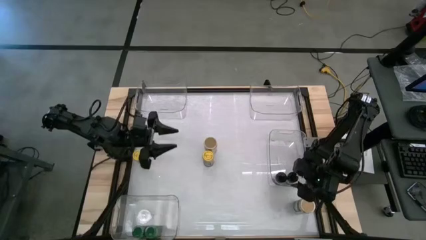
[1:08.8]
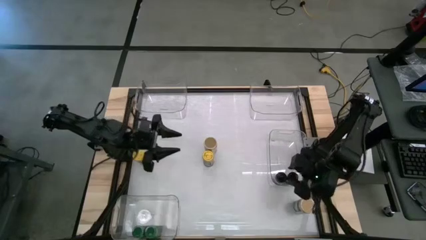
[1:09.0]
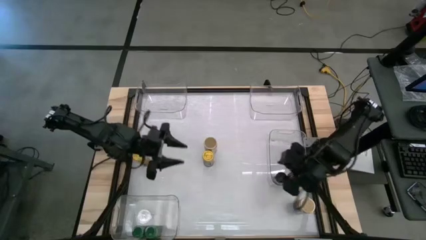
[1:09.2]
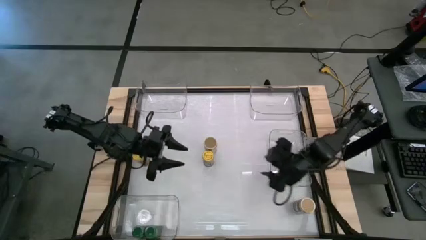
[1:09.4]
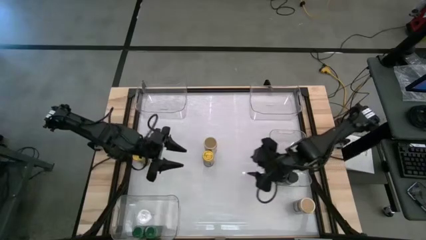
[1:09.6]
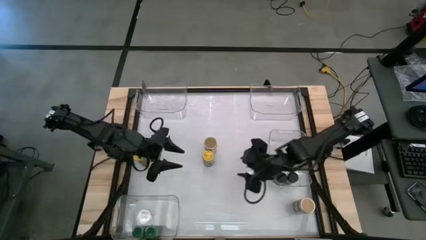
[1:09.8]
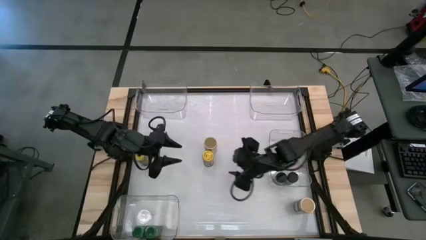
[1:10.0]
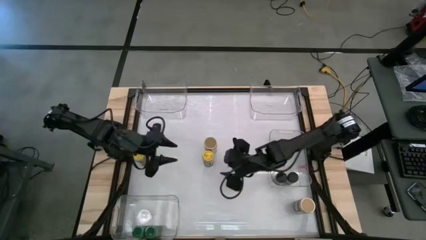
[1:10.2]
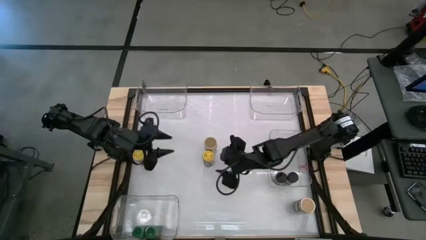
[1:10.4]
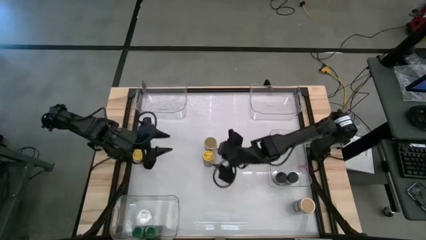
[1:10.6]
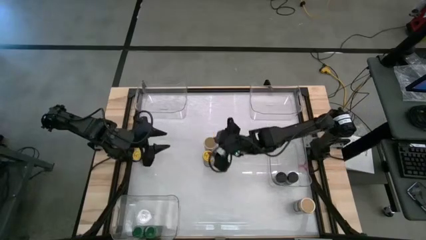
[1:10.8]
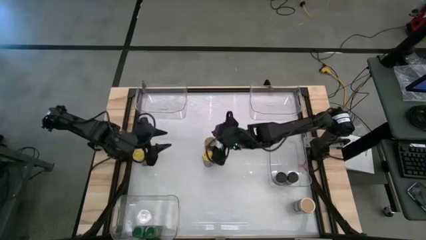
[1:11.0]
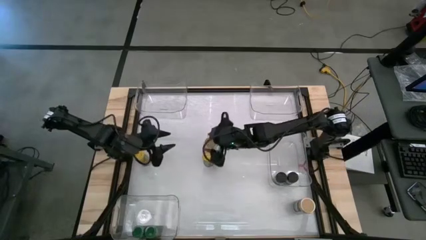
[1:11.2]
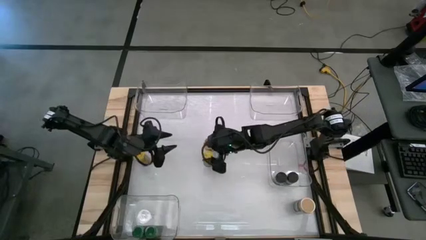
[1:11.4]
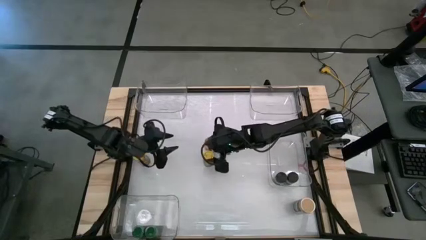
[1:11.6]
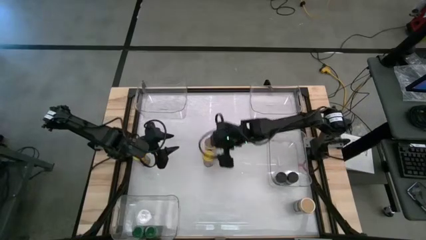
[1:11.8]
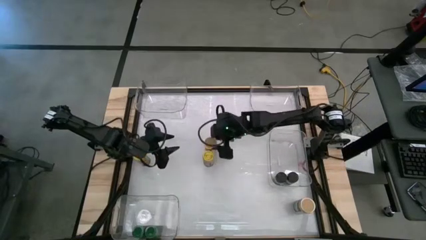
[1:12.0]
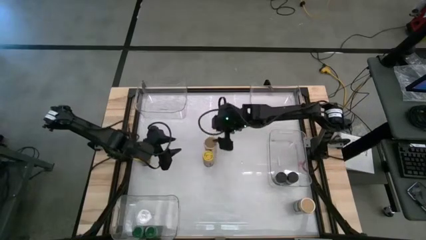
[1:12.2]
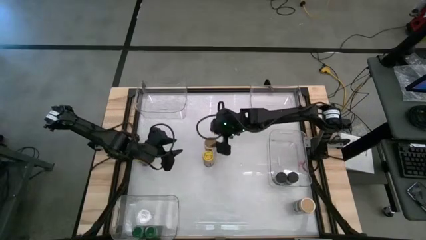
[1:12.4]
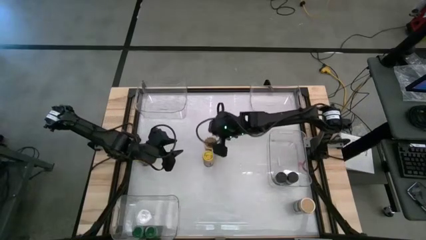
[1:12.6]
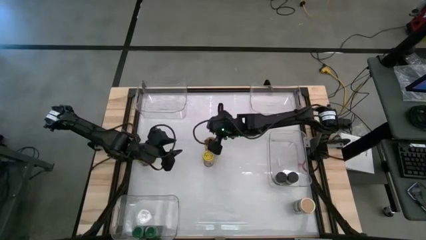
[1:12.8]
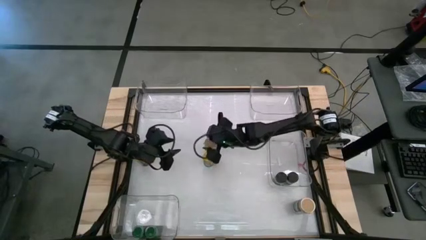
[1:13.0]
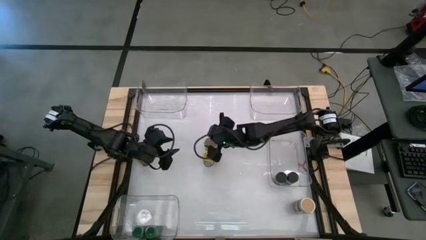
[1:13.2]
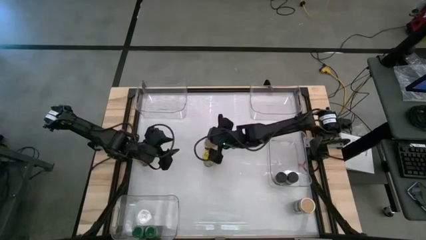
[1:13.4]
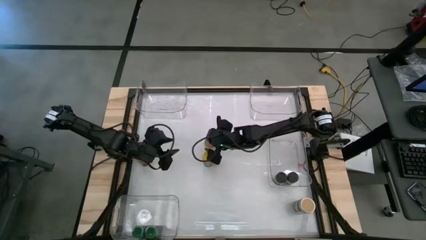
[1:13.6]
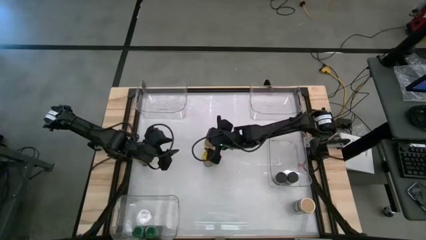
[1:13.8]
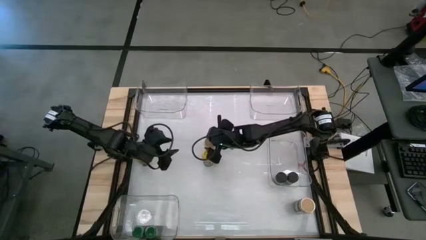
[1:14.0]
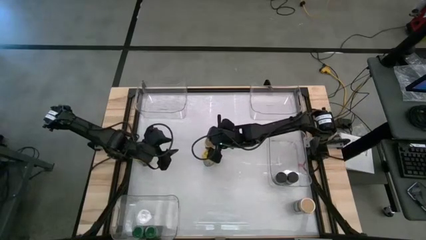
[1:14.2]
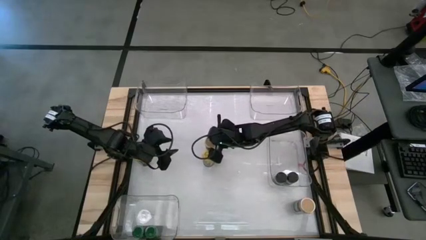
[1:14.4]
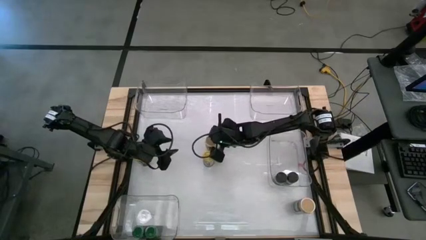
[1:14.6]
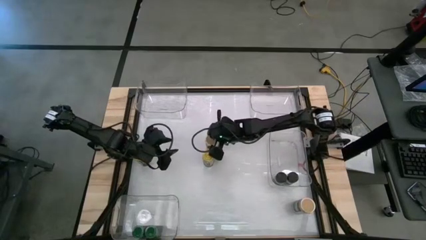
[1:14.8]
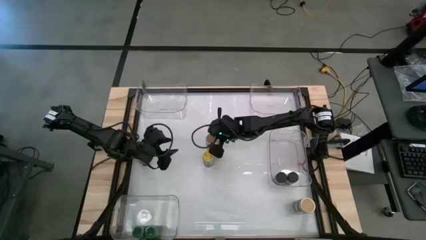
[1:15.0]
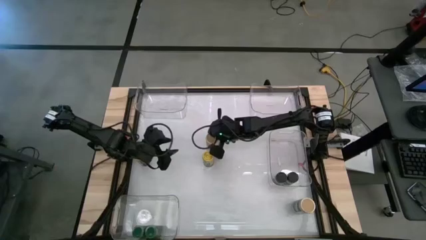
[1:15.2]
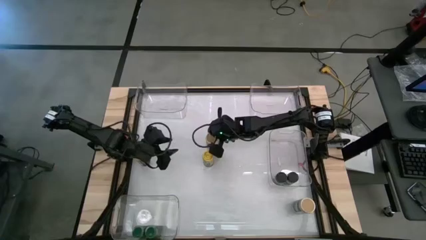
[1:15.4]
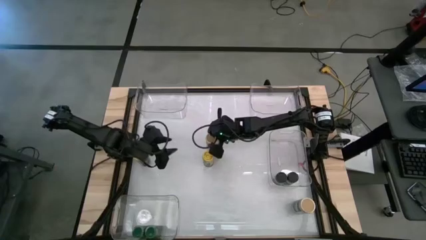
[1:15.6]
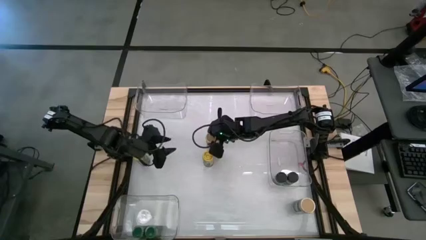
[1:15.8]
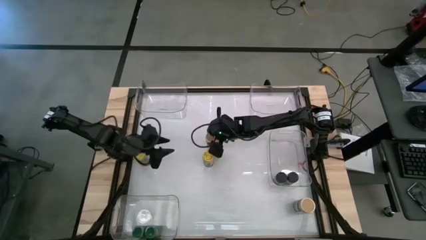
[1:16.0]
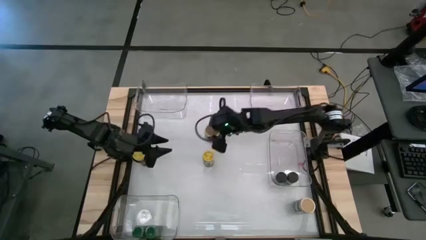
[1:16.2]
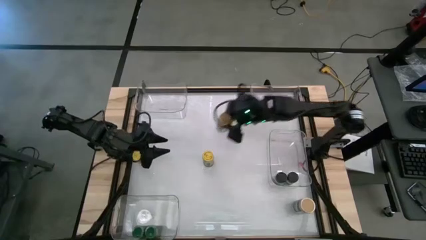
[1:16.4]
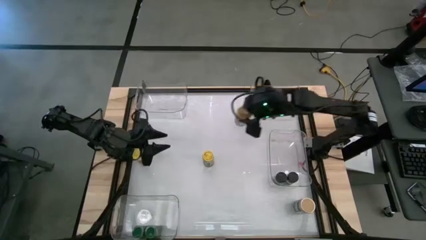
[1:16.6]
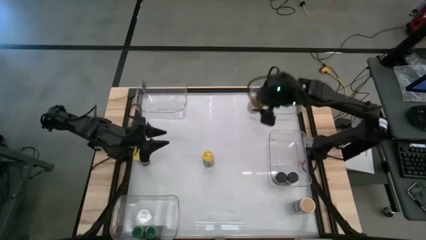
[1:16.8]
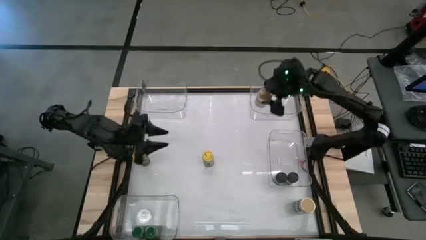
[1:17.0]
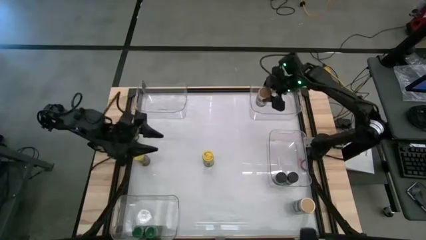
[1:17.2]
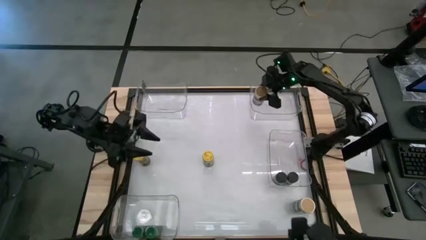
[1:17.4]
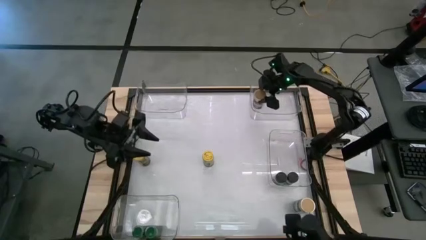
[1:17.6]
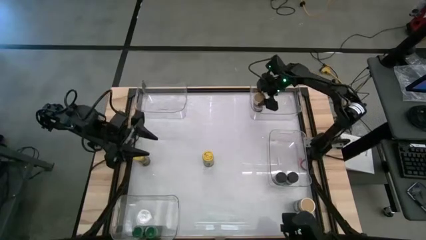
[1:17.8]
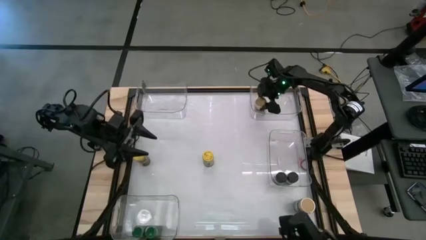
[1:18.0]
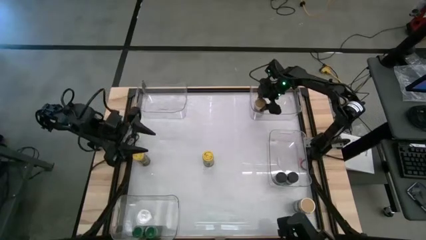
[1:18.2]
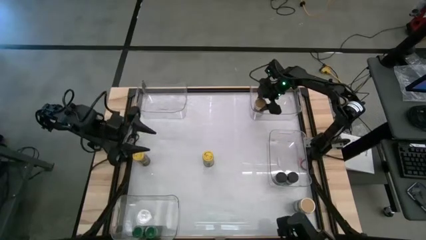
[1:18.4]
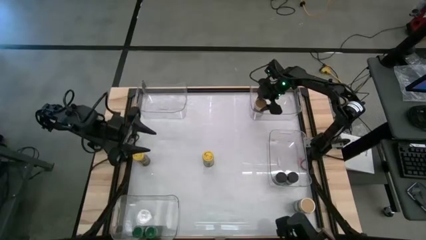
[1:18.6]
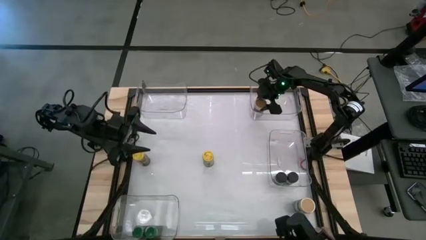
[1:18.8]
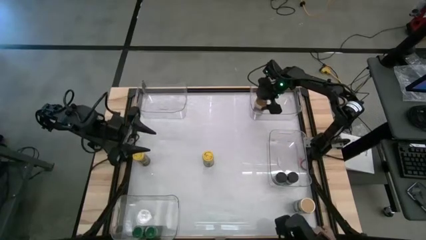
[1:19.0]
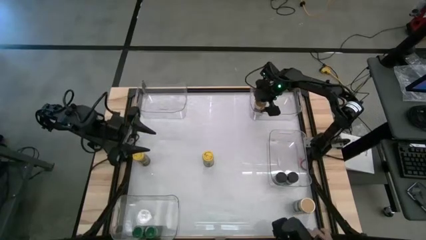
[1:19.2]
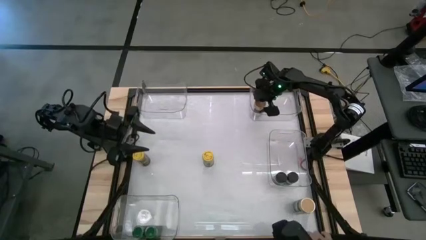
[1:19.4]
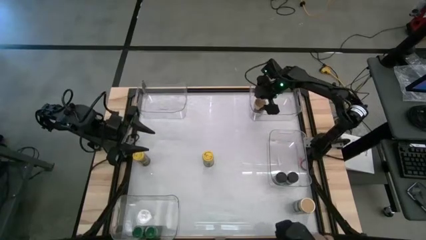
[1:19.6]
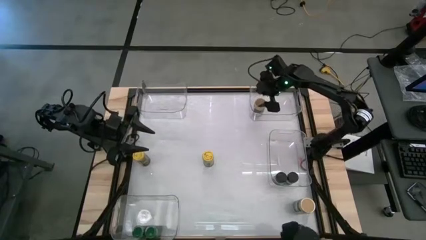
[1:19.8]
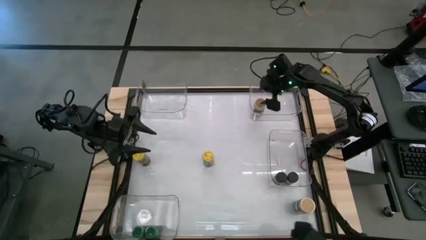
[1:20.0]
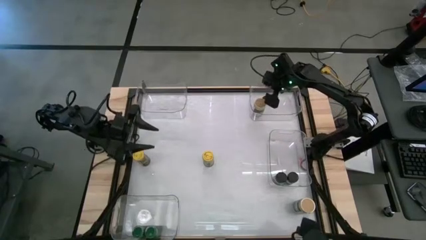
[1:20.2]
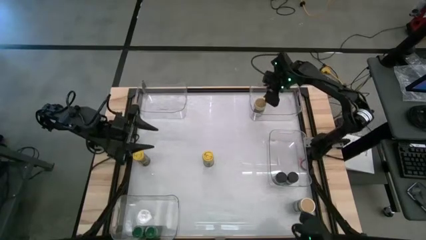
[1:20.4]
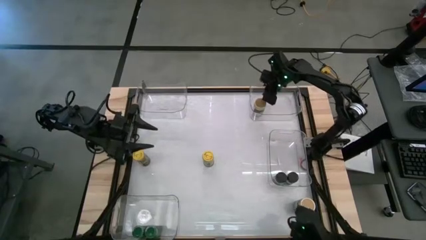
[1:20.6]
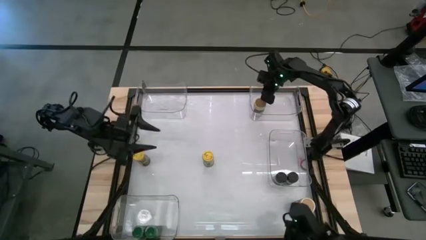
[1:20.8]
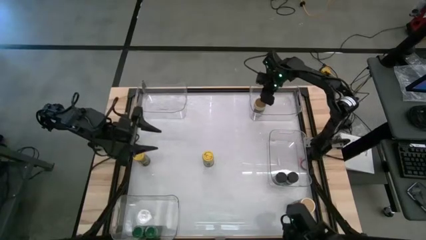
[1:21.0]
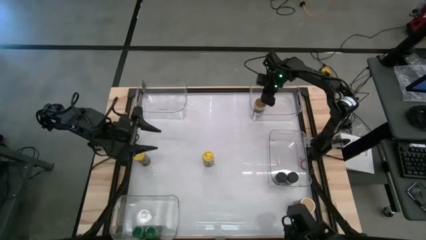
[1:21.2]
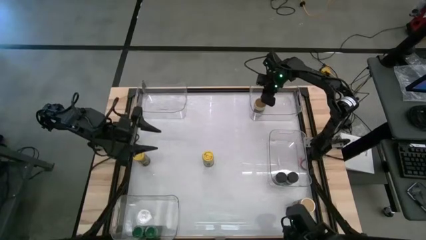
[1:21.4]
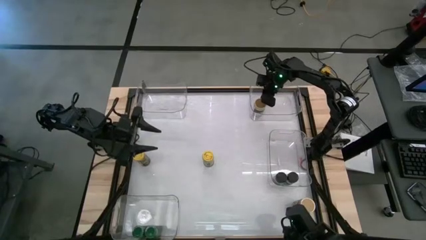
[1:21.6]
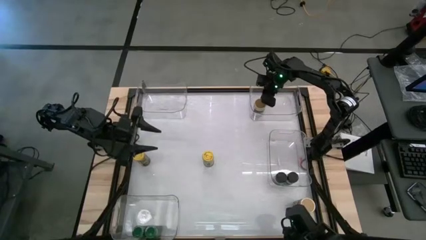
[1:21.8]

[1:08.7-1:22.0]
Task: Sort spices by type
Put the top gold seasoning bottle into the top right transparent bin

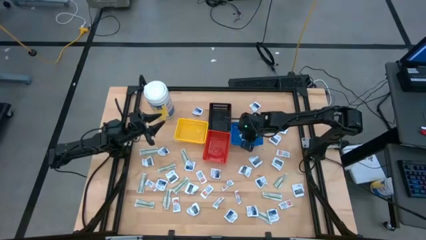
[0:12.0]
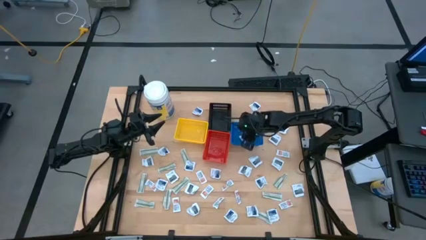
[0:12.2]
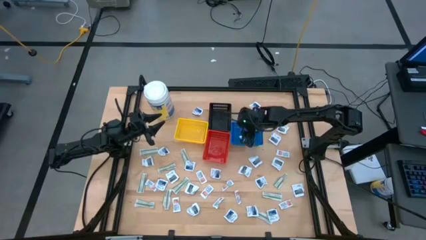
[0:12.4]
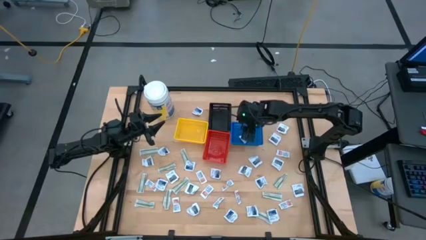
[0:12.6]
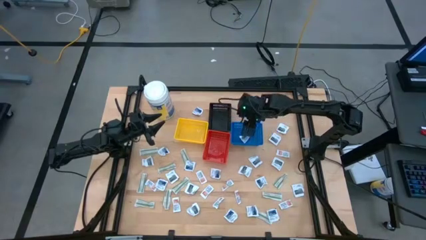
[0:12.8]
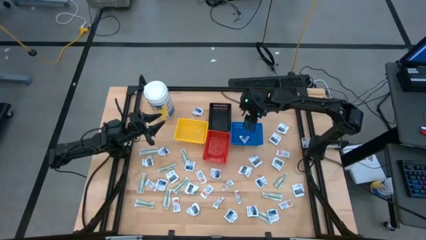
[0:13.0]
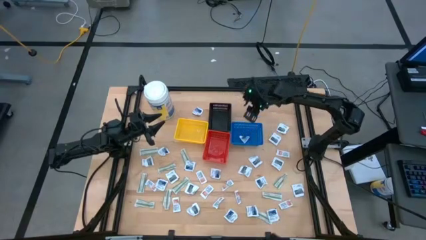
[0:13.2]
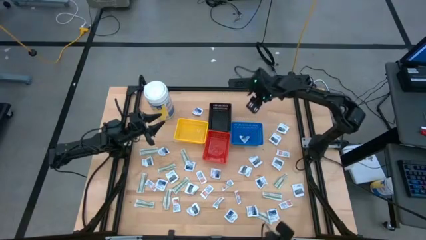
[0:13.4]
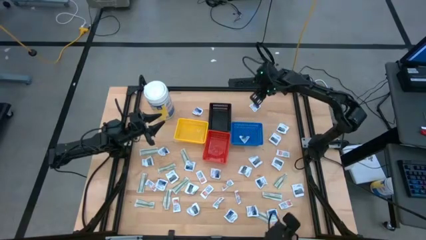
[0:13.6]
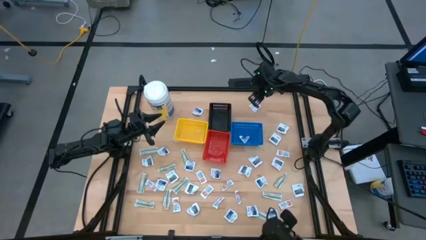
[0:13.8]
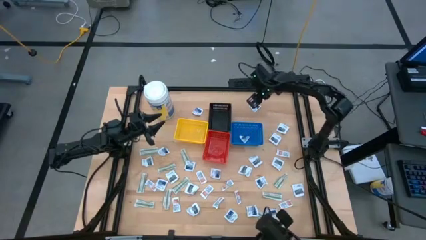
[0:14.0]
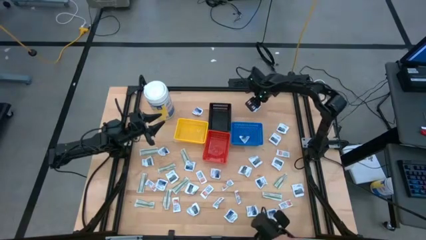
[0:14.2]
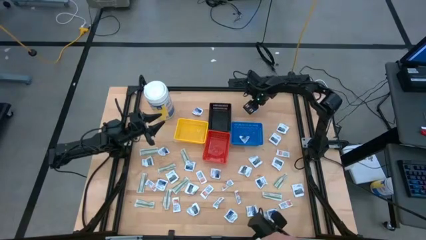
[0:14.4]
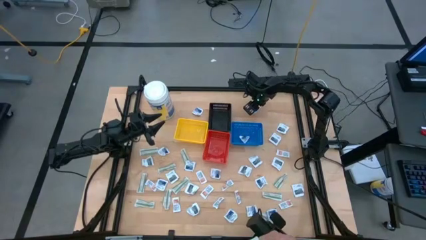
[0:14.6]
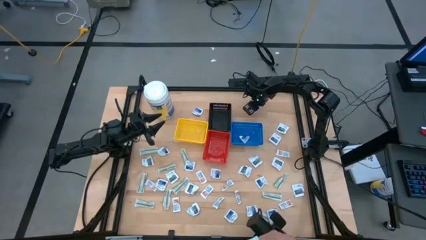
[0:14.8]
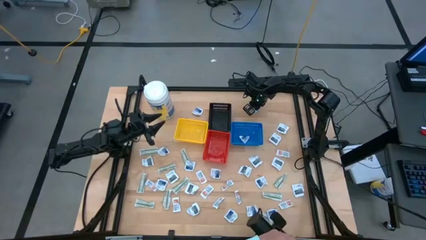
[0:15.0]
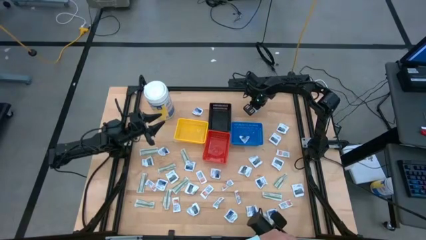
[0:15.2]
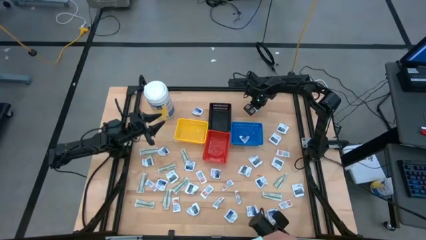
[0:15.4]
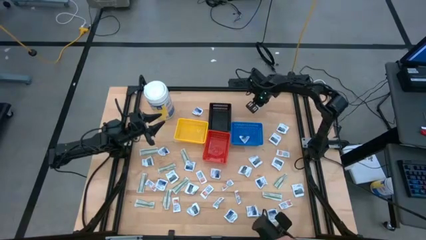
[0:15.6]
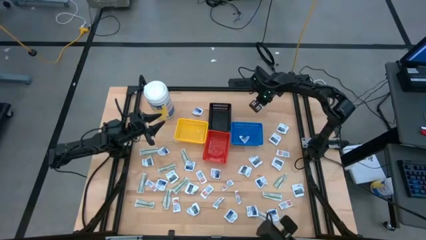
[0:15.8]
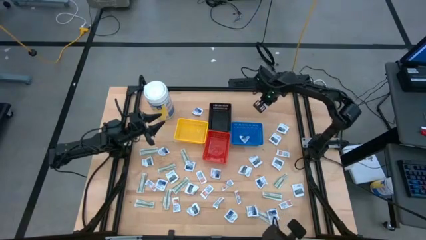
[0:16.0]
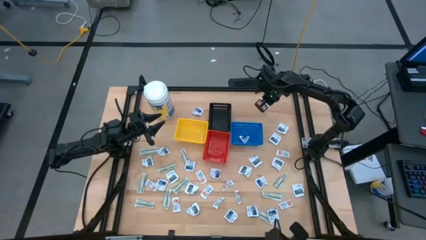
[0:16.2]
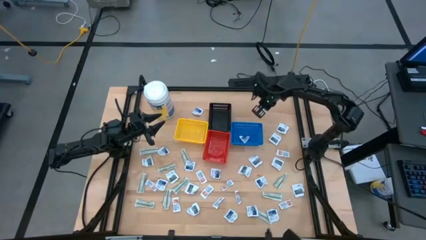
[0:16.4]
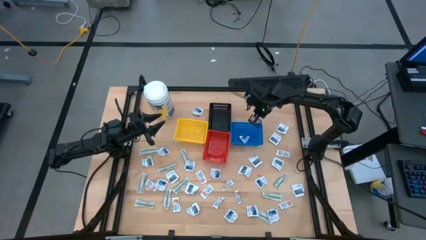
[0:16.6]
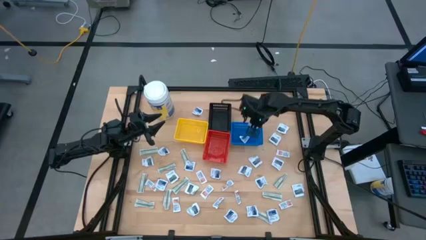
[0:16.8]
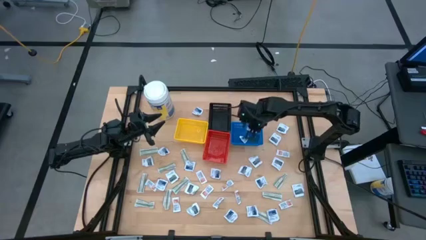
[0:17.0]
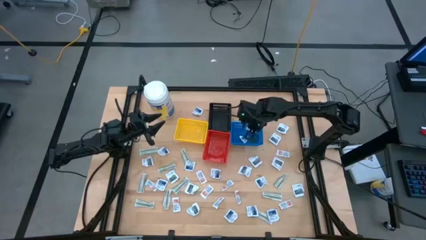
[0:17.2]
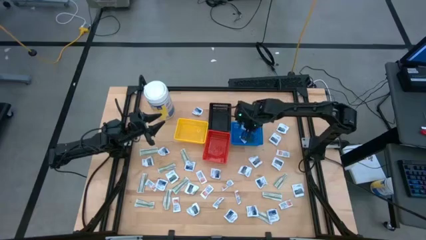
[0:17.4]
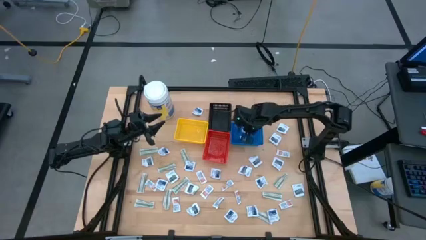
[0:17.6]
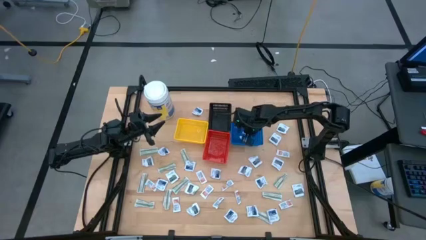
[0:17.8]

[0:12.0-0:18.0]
Task: Pick & Place First Aid Supplies
Put the alcohol pad into the blue bin
